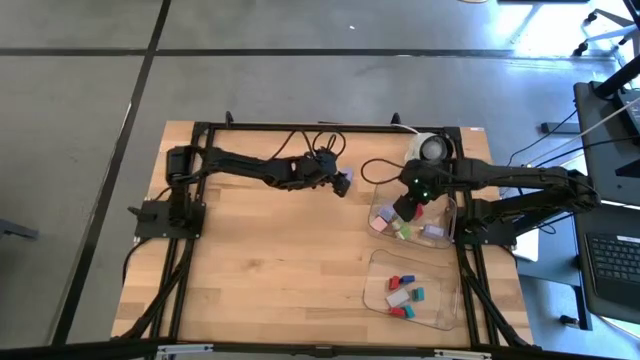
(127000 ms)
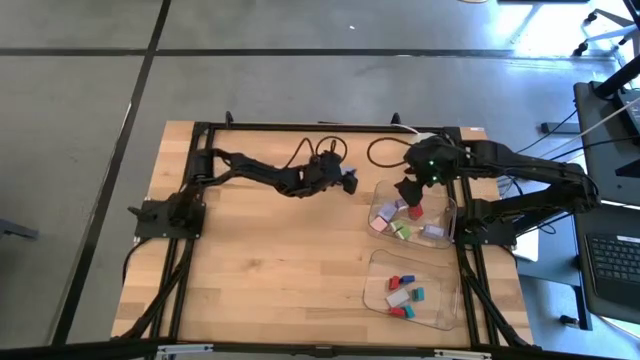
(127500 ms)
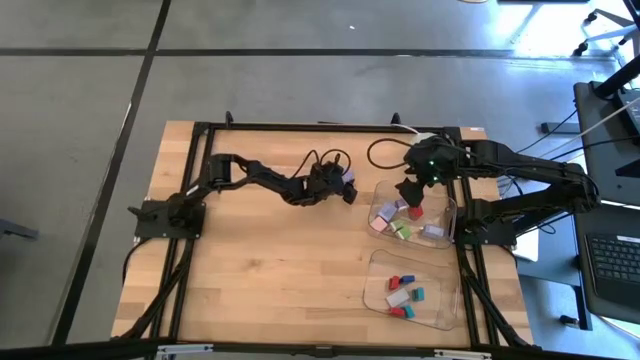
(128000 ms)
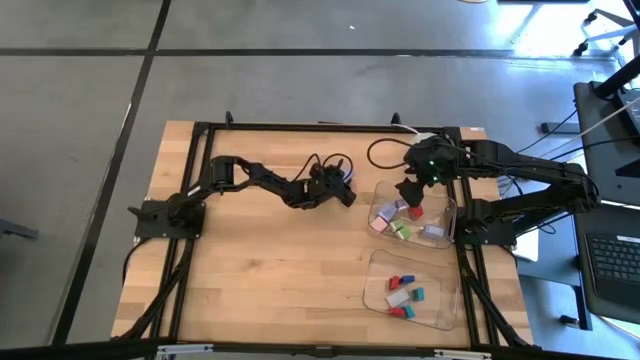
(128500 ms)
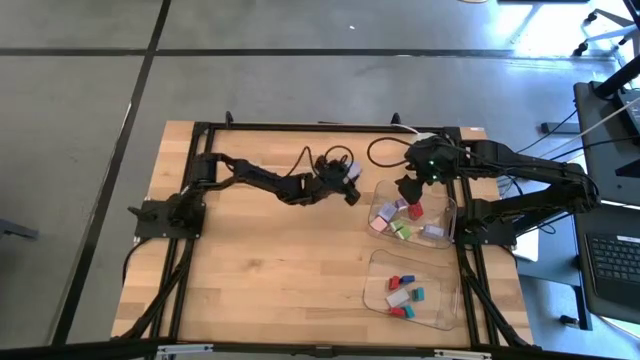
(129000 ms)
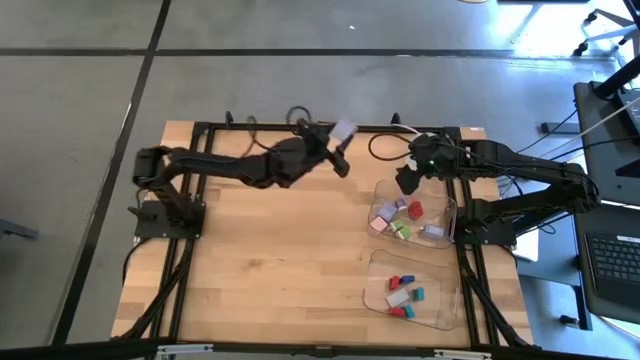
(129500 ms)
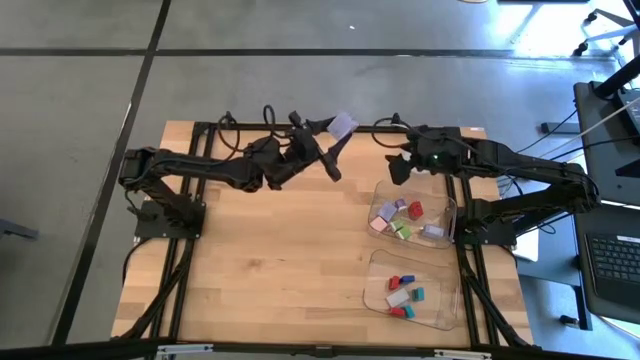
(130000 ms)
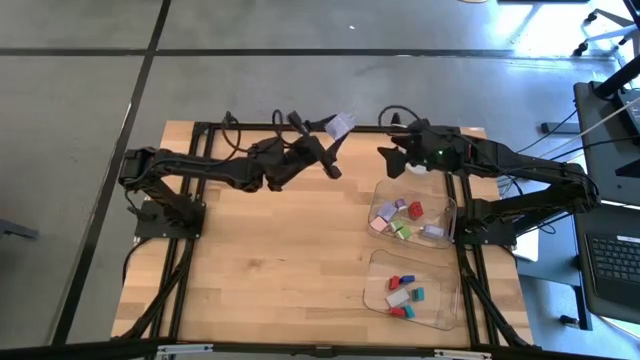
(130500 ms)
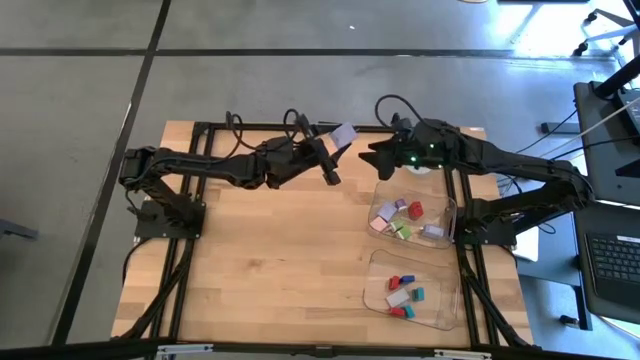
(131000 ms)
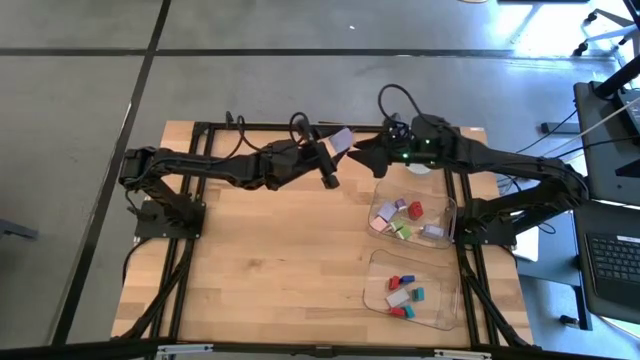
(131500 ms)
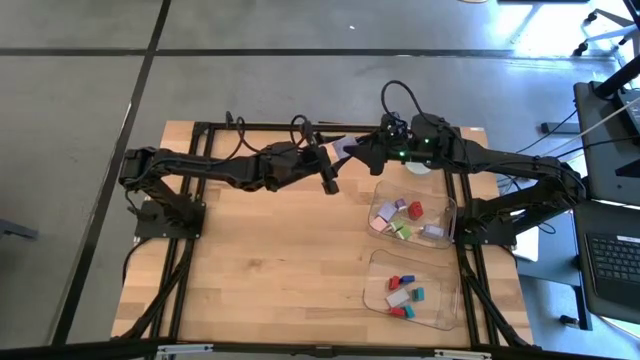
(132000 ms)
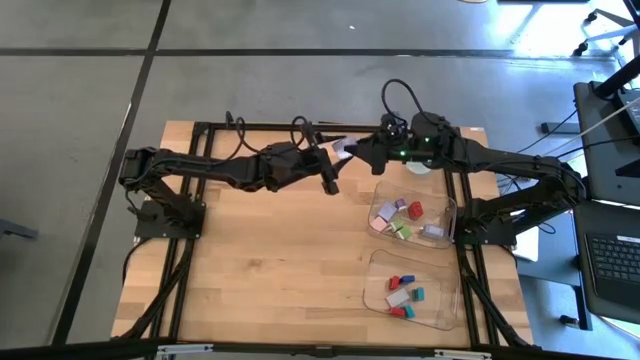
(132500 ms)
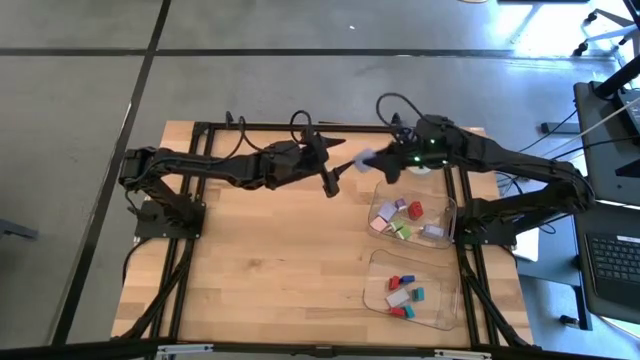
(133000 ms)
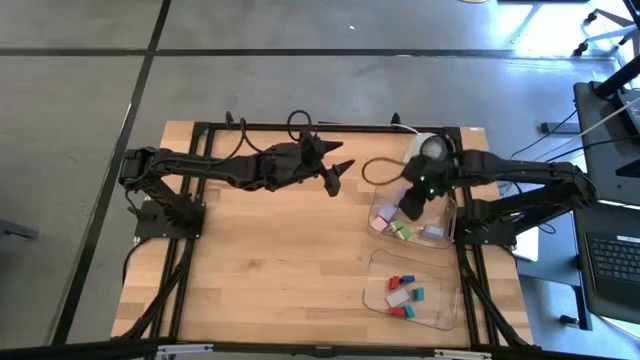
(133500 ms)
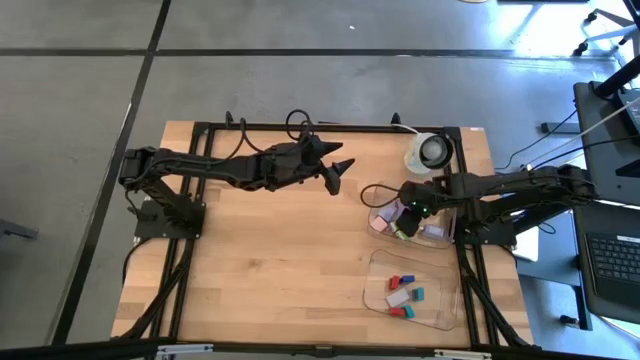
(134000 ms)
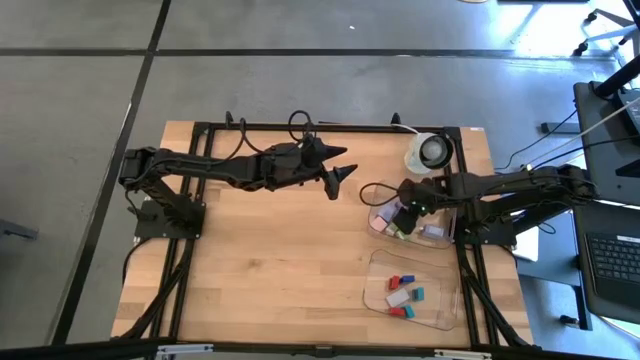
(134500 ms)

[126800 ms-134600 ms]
Task: Pick & Place Office items
Put the blue charger adapter into the top transparent bin

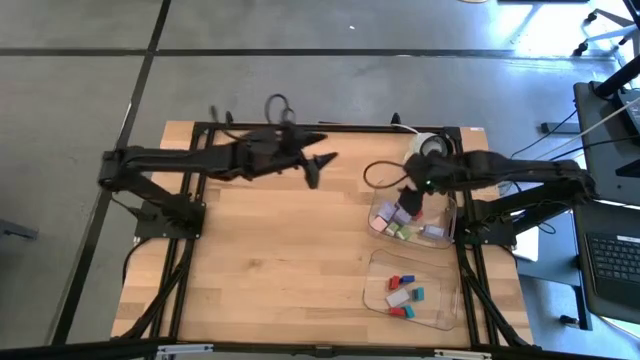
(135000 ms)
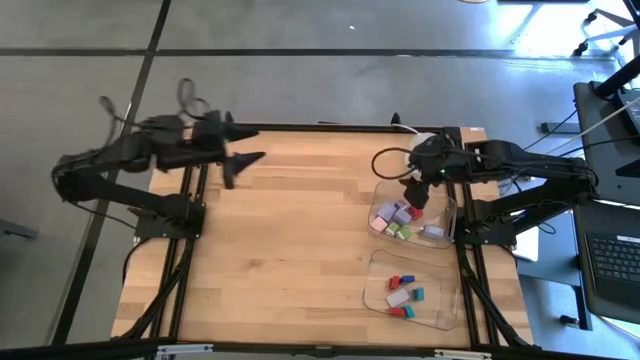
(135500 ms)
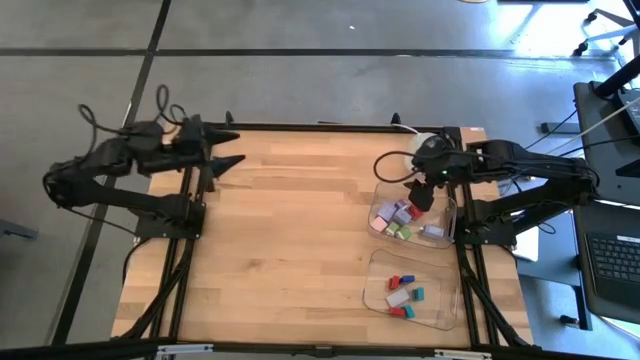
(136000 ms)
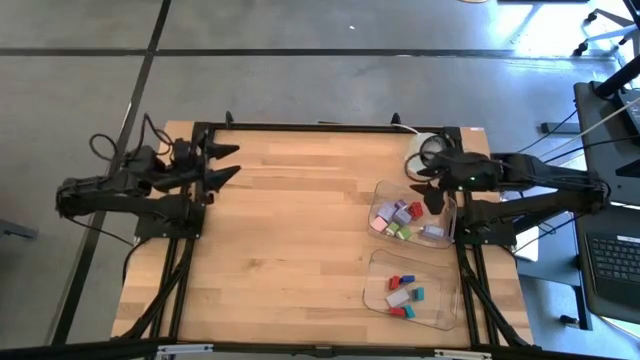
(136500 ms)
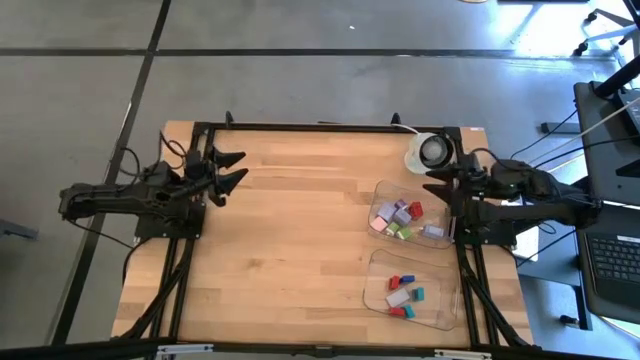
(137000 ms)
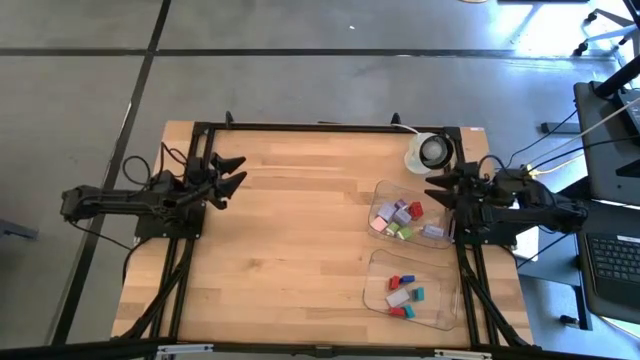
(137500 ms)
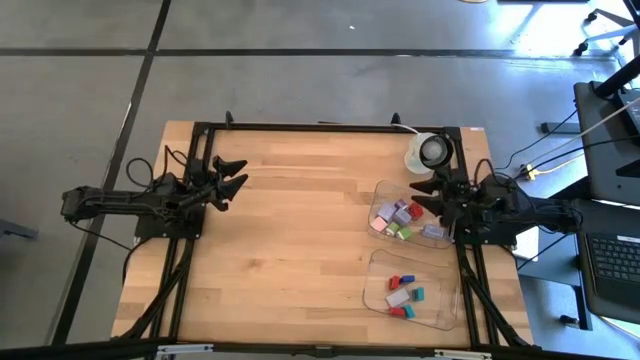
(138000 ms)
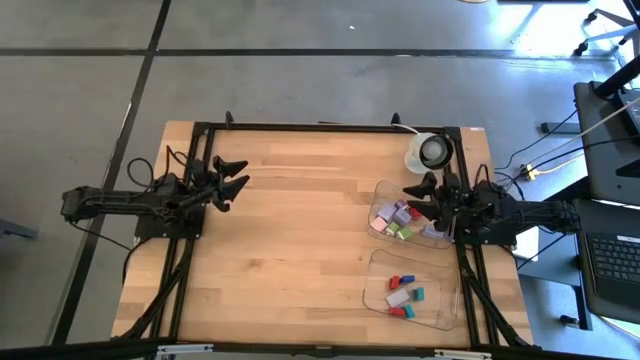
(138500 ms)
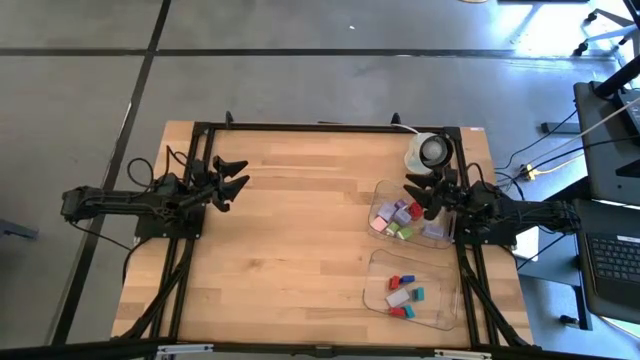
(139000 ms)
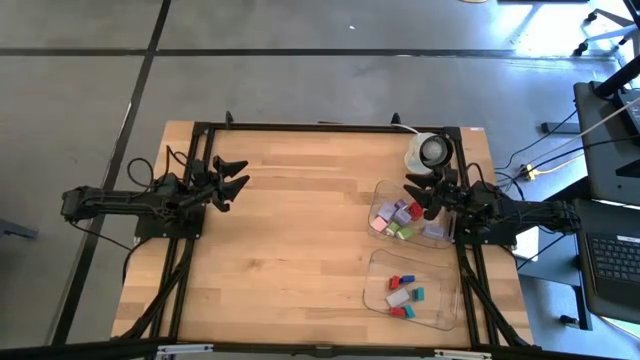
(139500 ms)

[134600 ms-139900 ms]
Return to Home Position

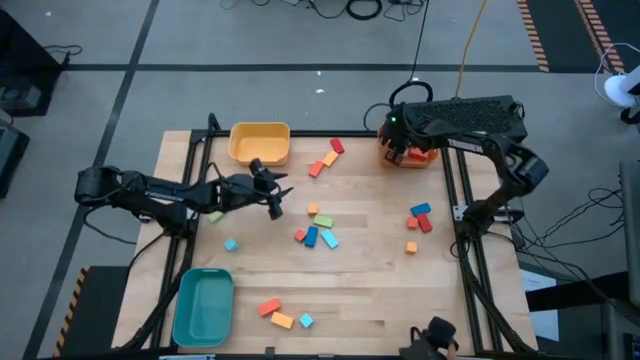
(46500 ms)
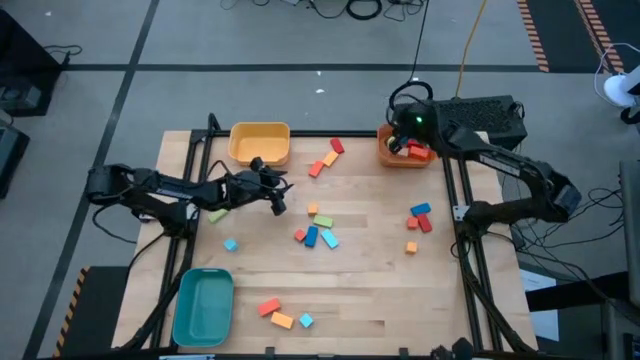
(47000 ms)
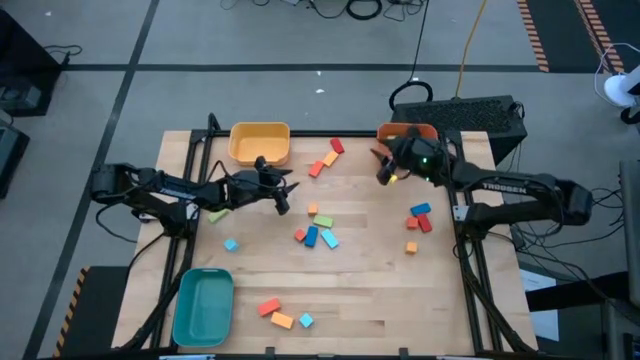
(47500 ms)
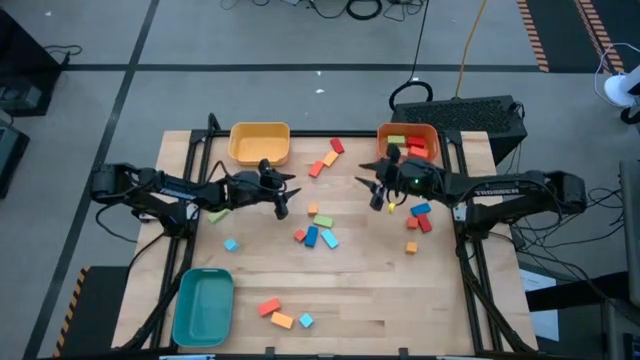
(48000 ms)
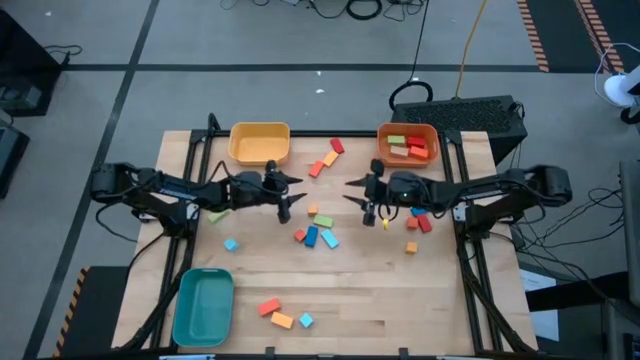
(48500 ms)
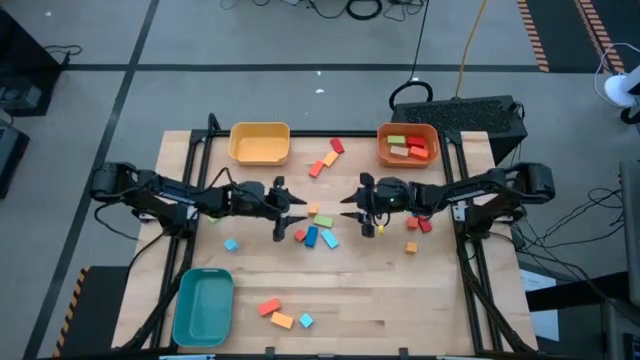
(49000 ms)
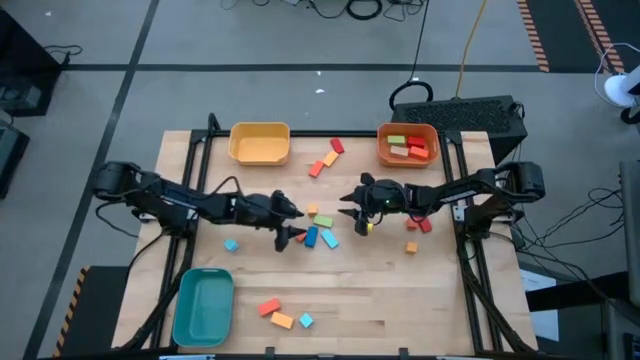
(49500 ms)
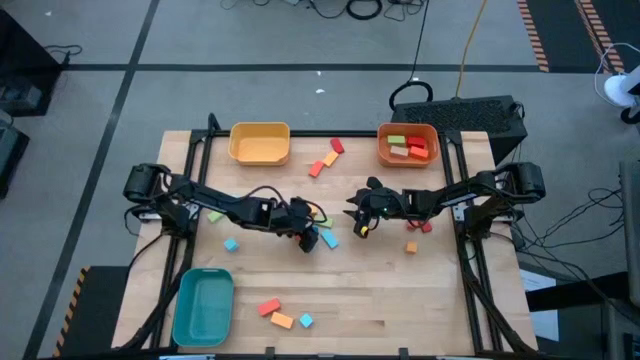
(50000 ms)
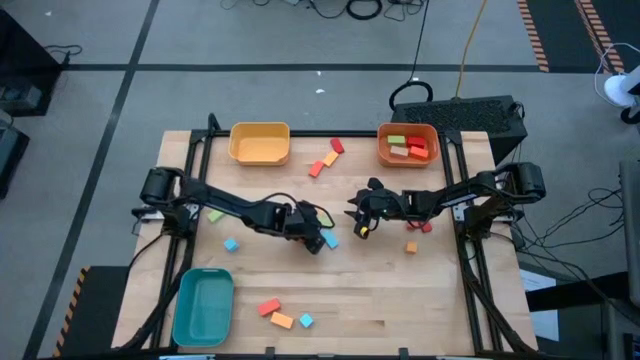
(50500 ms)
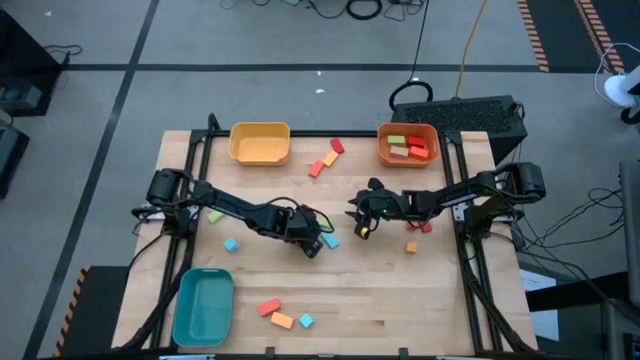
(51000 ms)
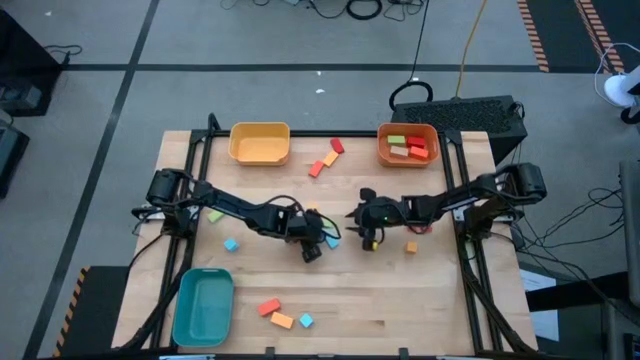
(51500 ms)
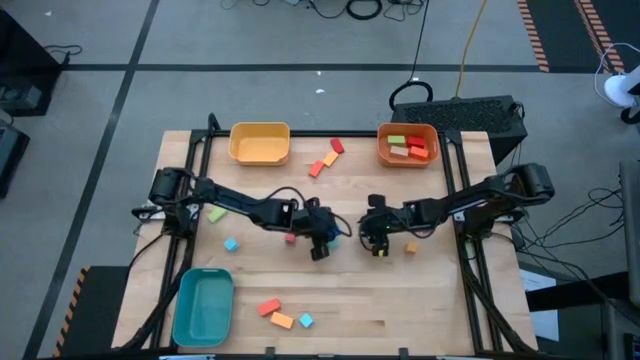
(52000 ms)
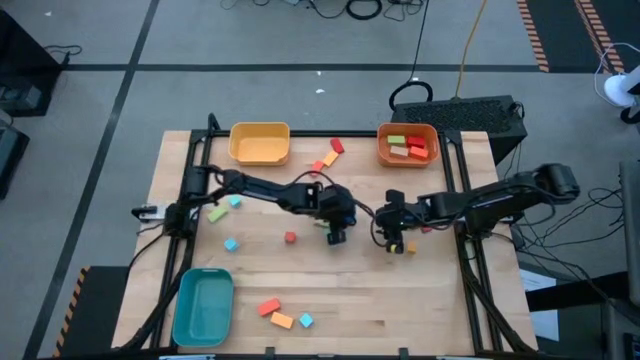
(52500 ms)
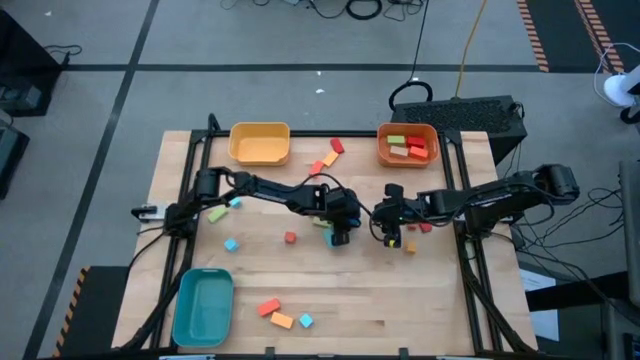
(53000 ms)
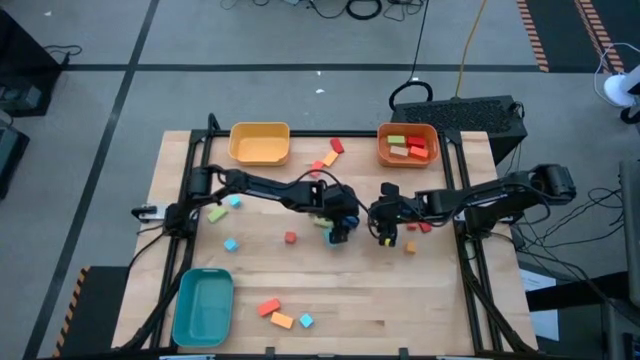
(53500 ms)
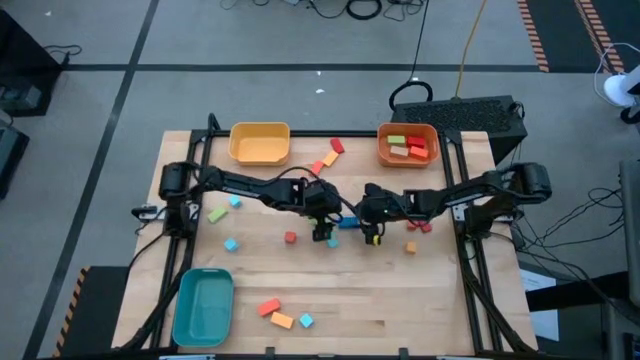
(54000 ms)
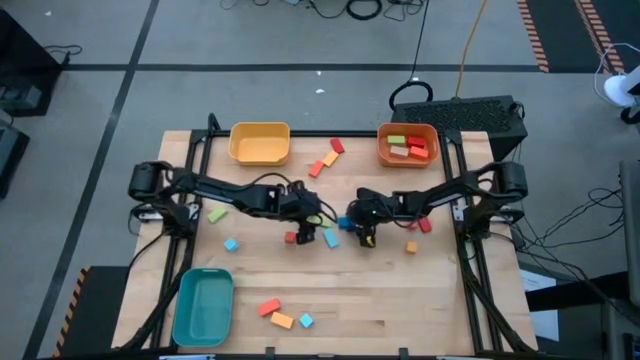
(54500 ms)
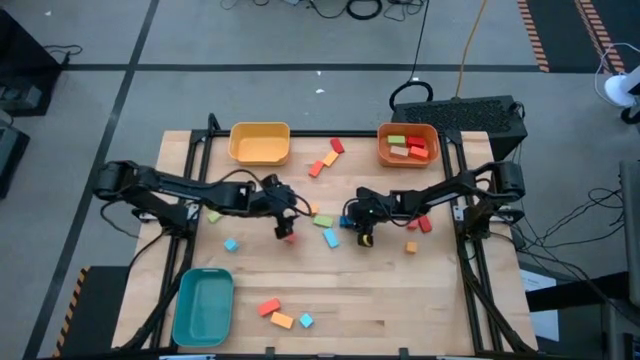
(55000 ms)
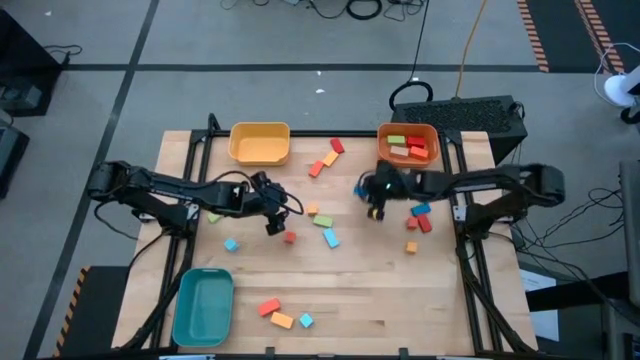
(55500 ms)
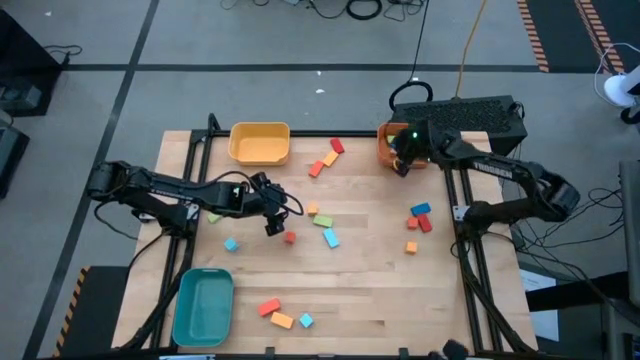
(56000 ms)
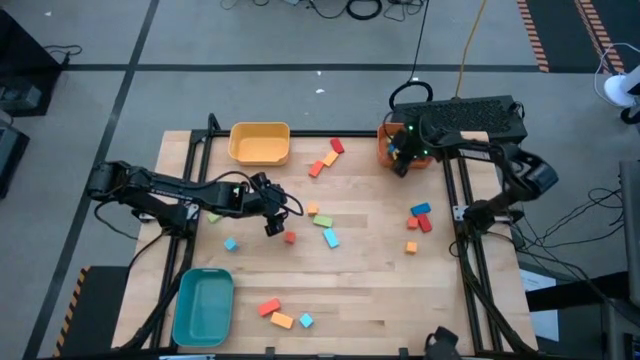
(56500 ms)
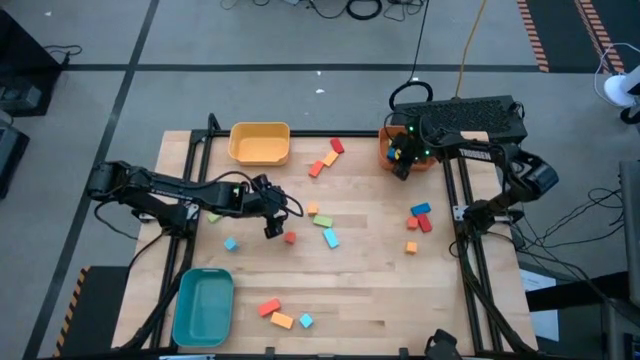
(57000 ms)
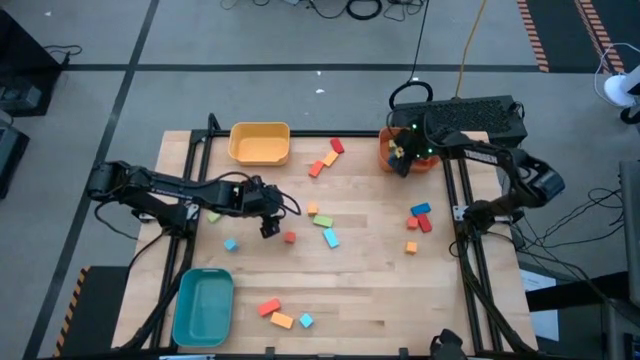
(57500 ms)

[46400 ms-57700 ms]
Task: Sort blocks by size
Put the large dark blue block into the orange bin
